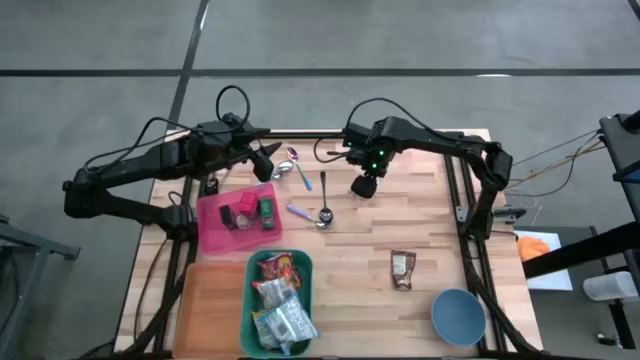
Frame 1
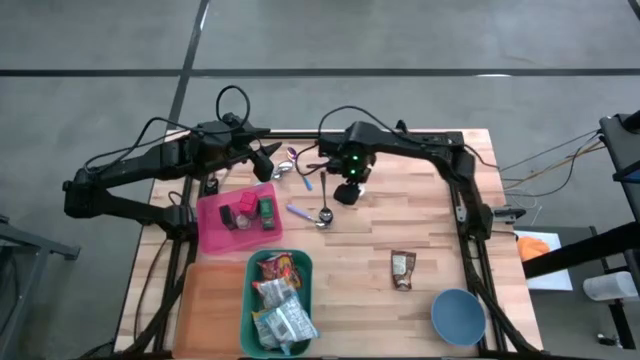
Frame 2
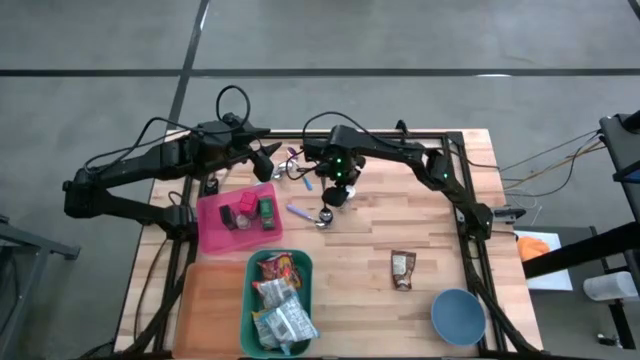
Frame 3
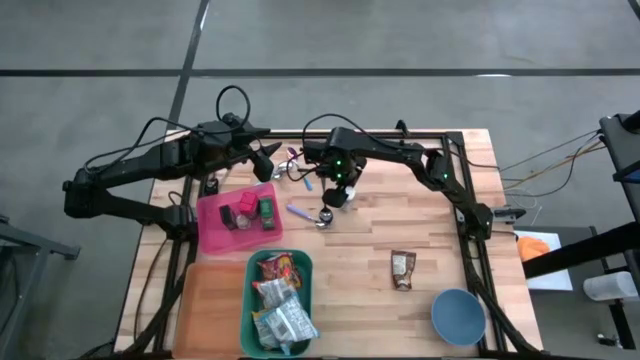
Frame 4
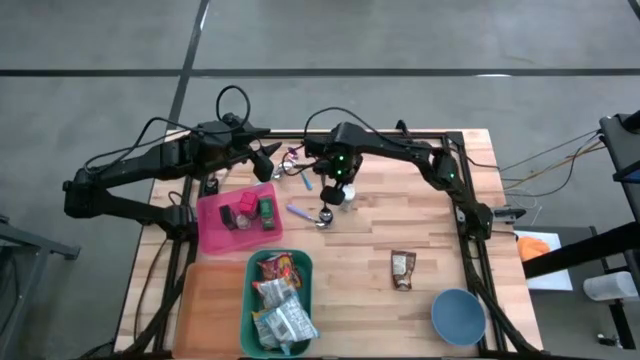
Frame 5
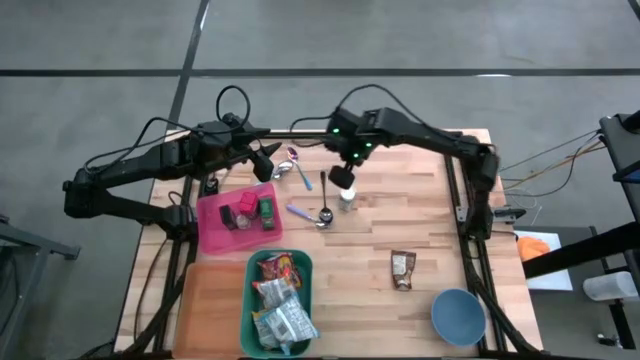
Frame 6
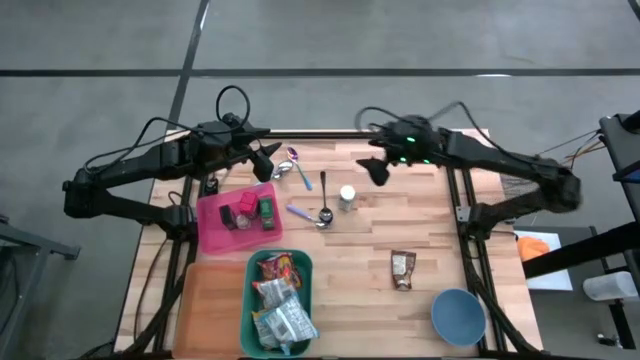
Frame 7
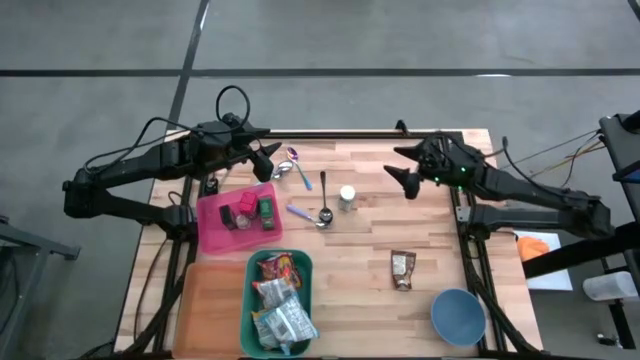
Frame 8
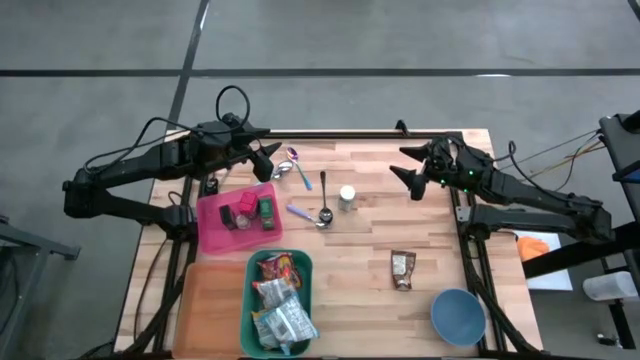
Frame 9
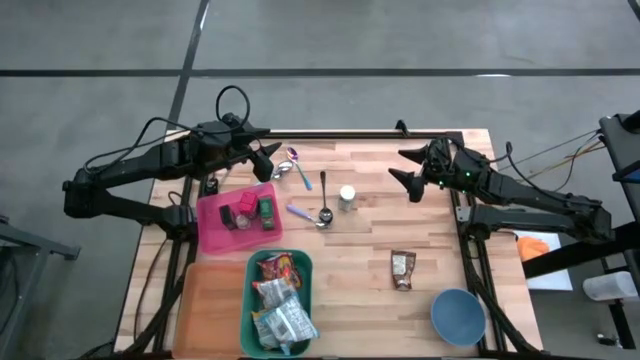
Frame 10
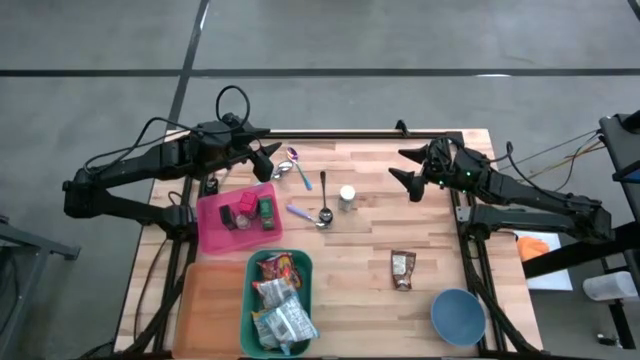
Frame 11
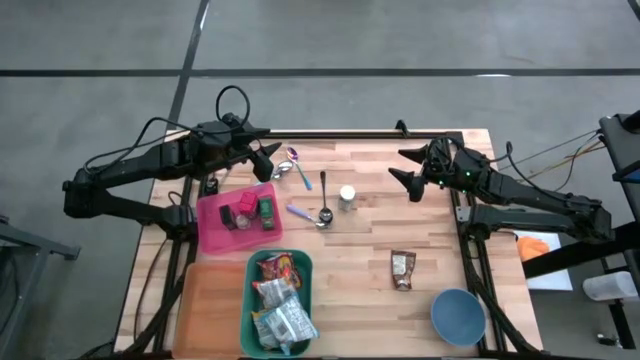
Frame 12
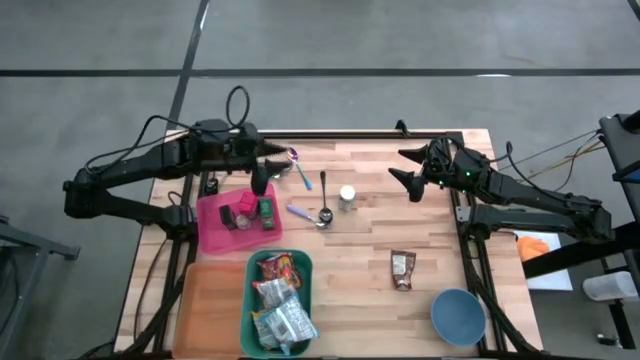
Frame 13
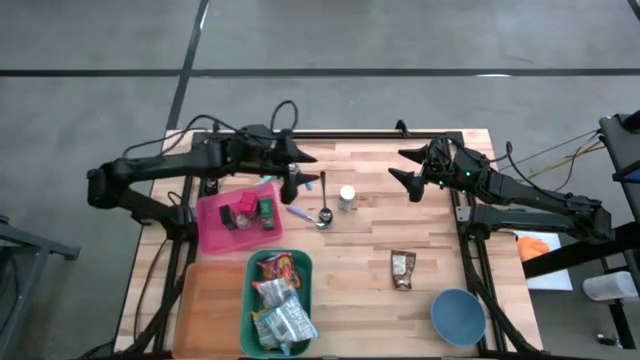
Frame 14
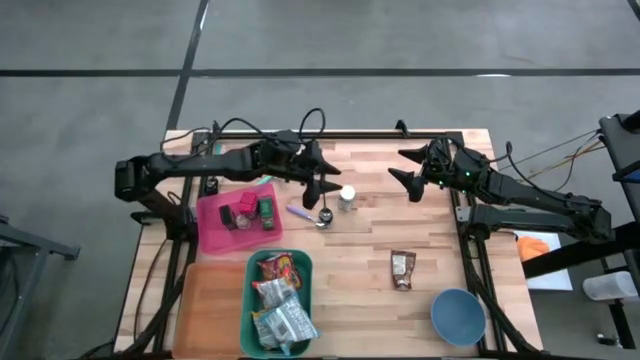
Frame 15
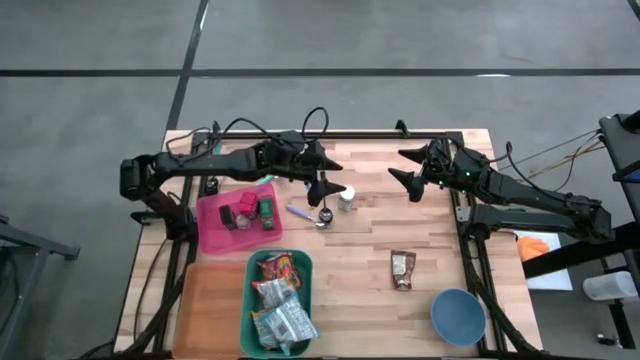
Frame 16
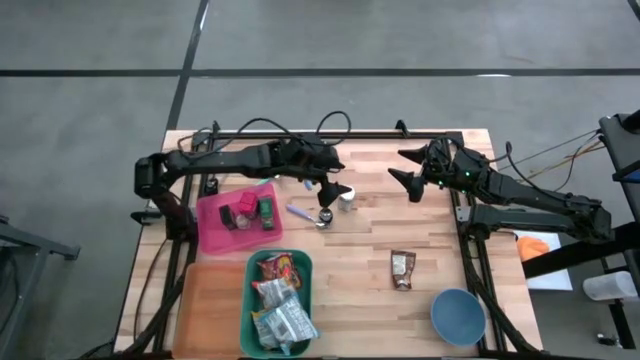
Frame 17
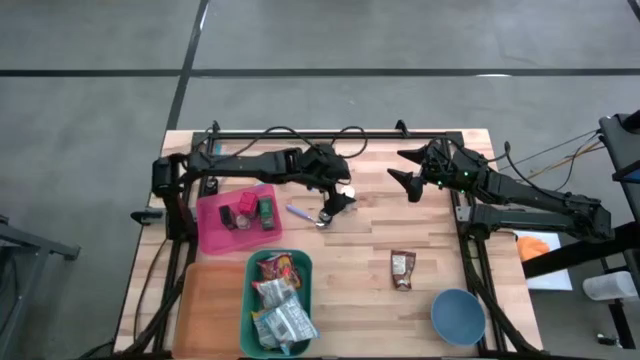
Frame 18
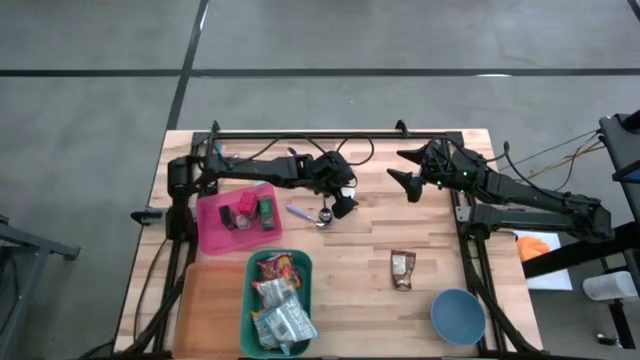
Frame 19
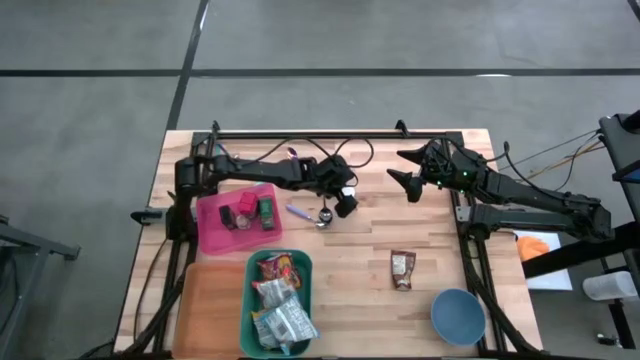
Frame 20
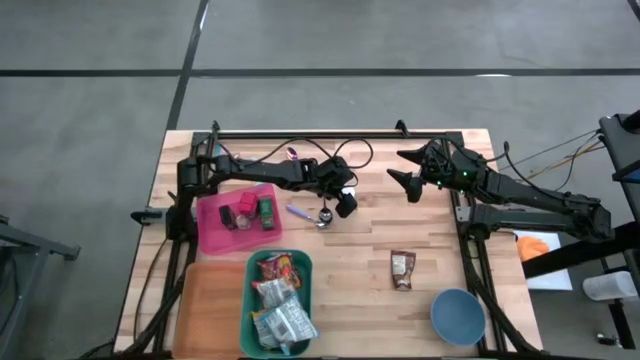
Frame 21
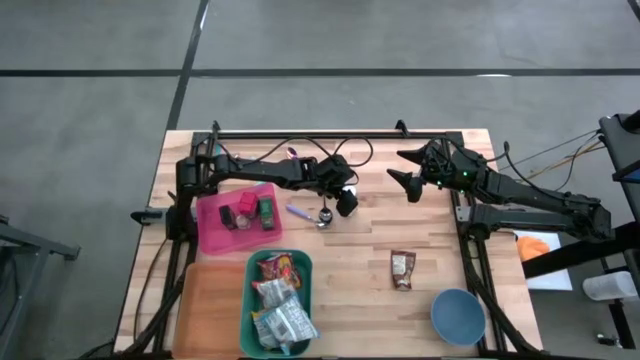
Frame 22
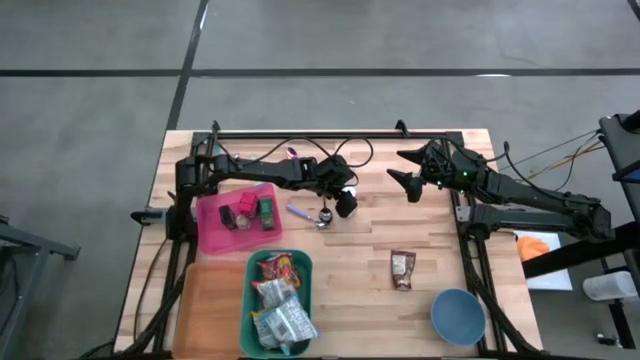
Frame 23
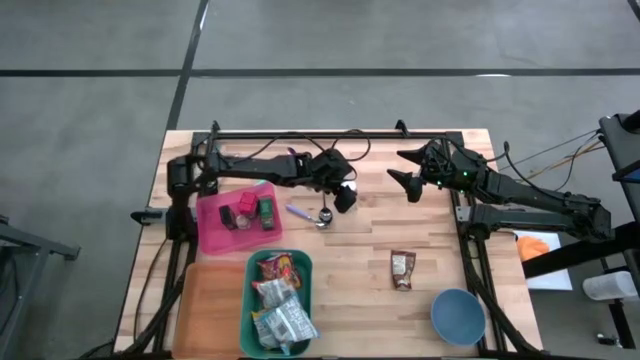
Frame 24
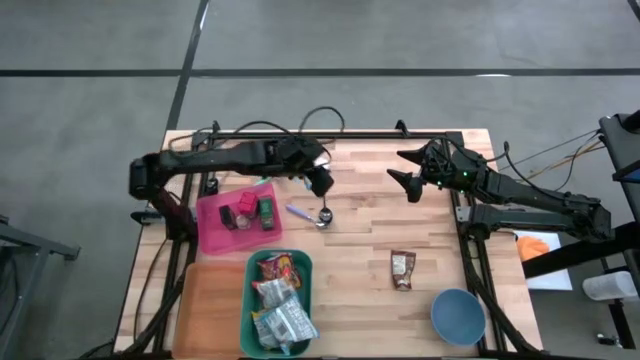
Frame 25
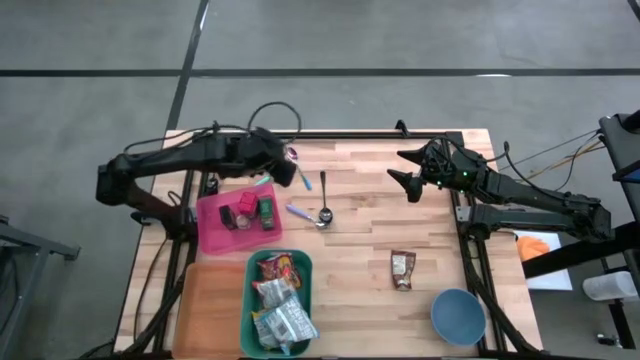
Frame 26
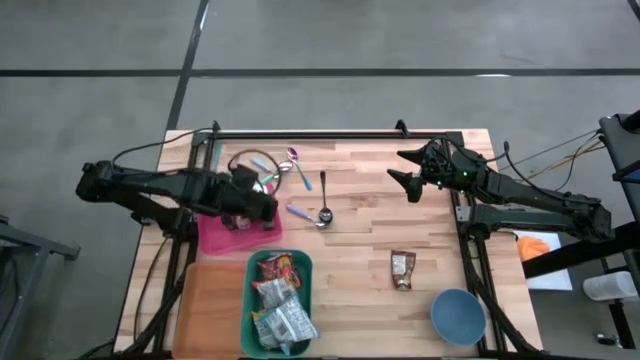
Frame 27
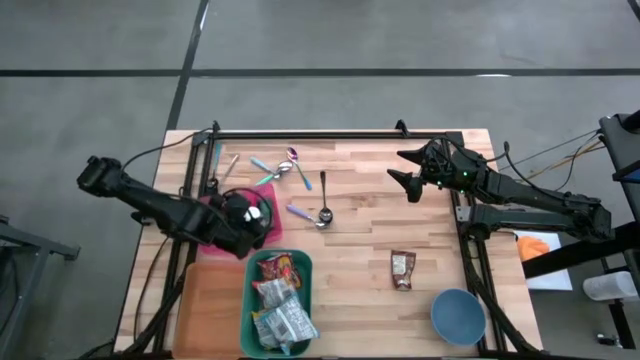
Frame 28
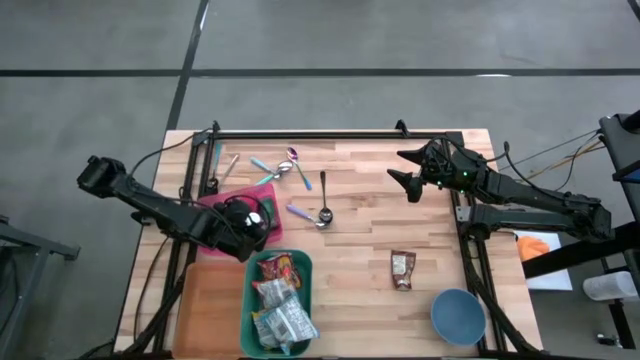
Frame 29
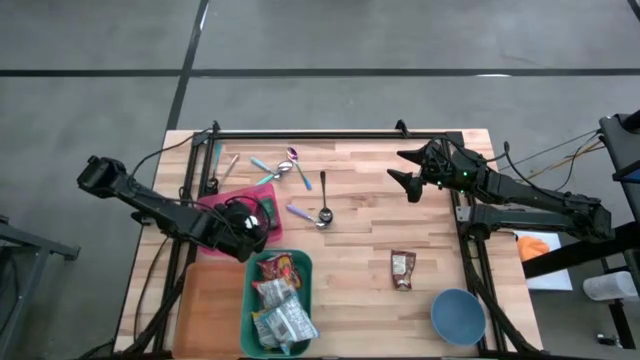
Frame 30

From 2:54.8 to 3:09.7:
Put the white seasoning bottle into the pink bin
